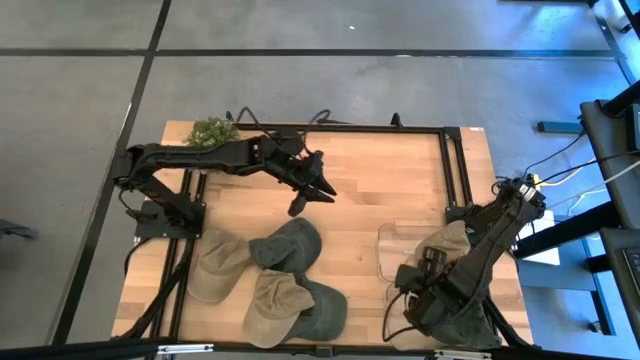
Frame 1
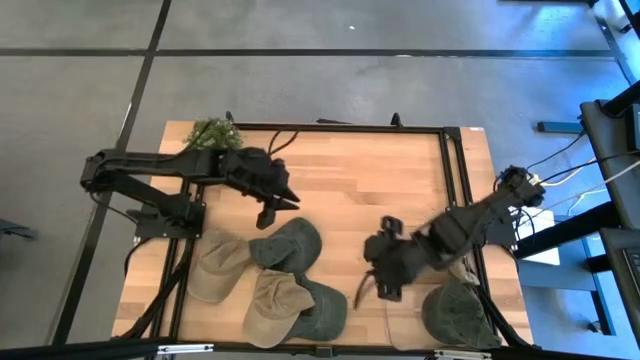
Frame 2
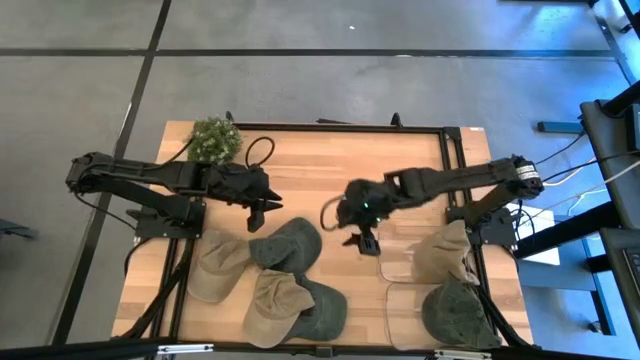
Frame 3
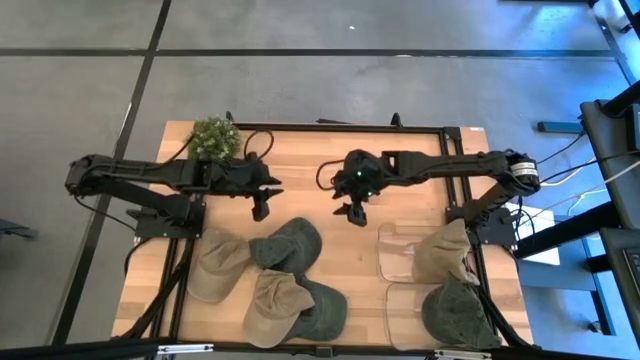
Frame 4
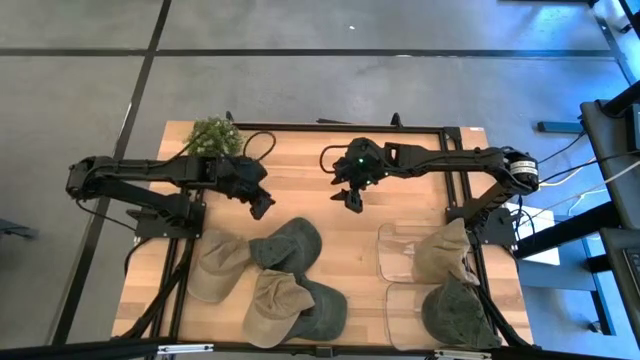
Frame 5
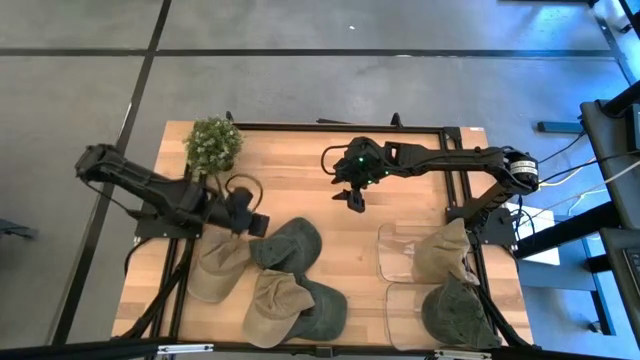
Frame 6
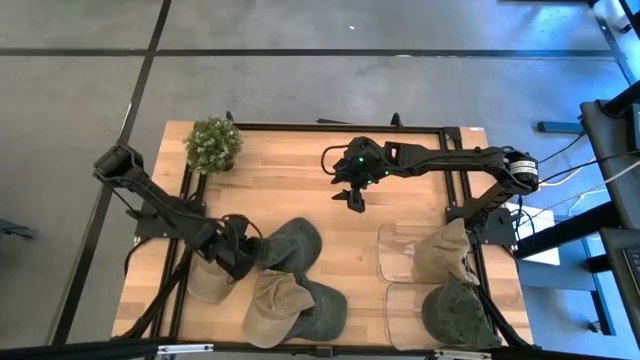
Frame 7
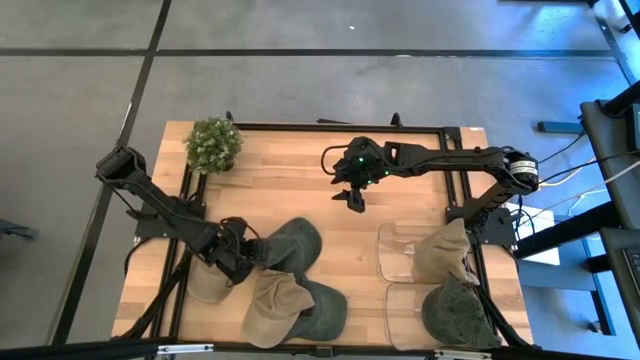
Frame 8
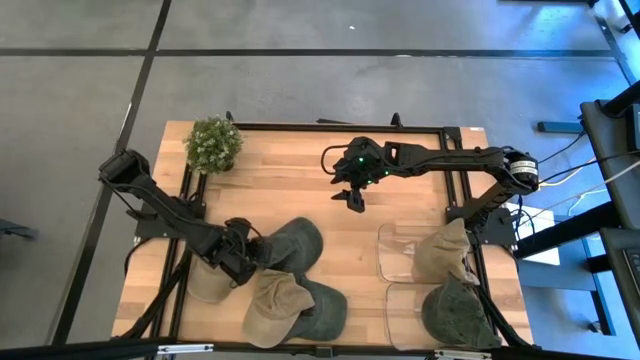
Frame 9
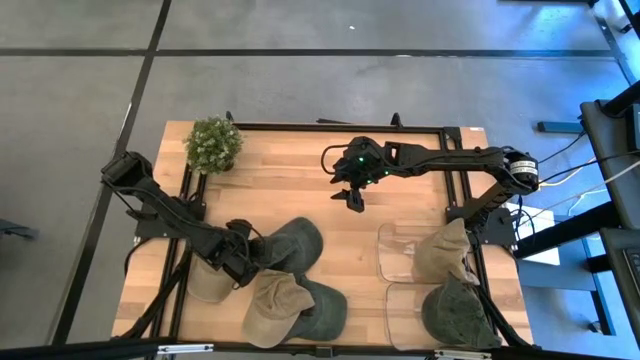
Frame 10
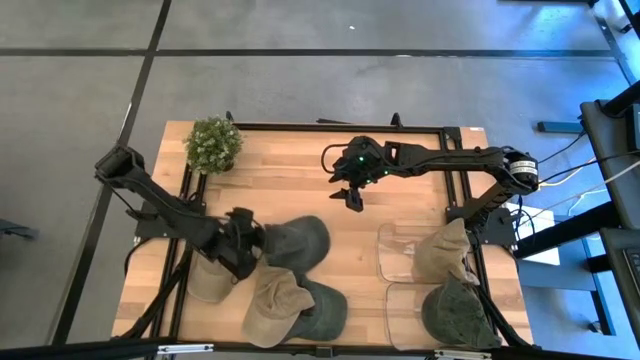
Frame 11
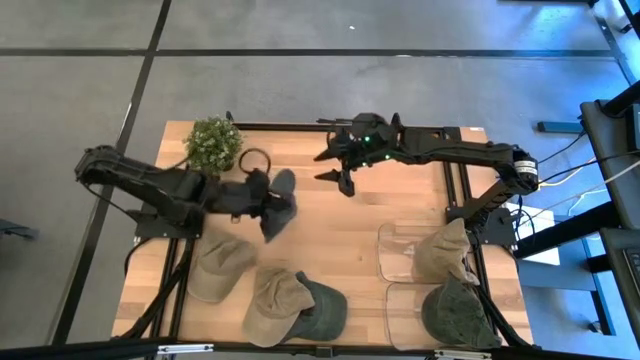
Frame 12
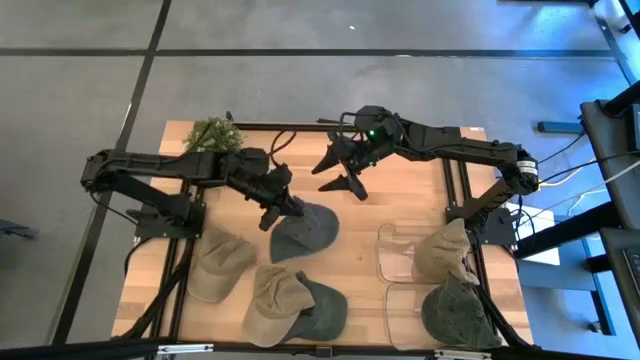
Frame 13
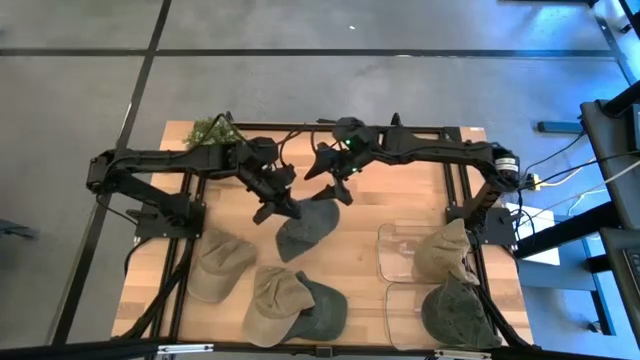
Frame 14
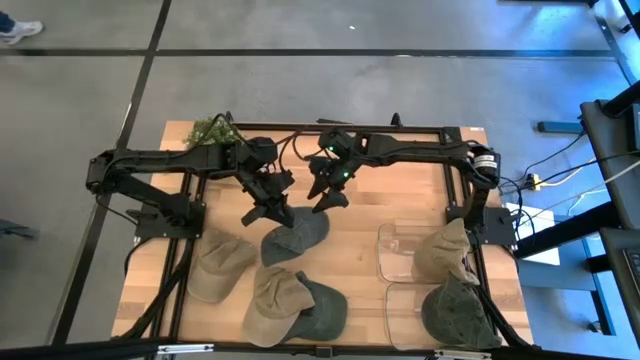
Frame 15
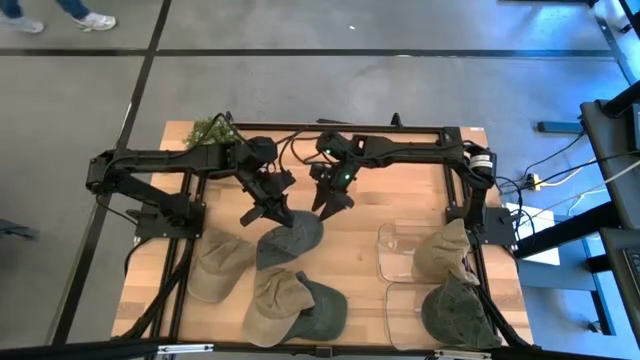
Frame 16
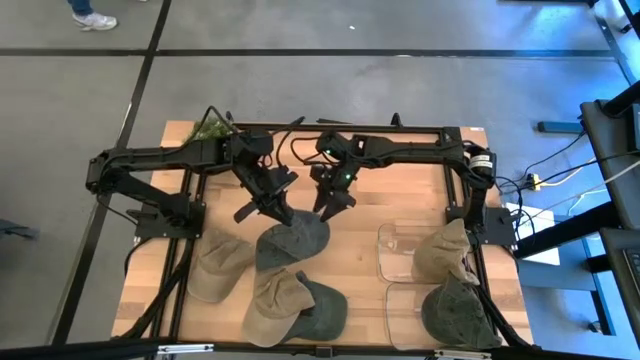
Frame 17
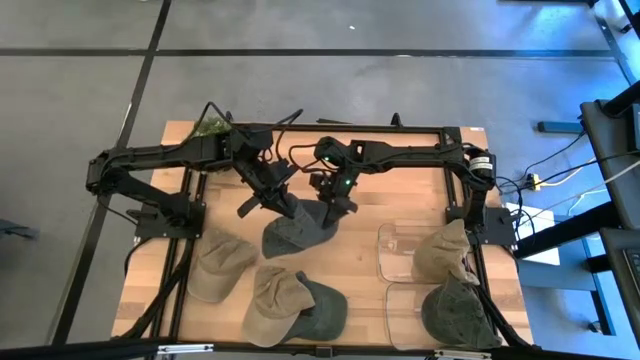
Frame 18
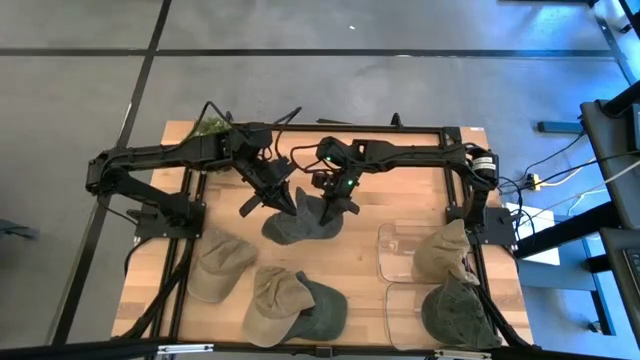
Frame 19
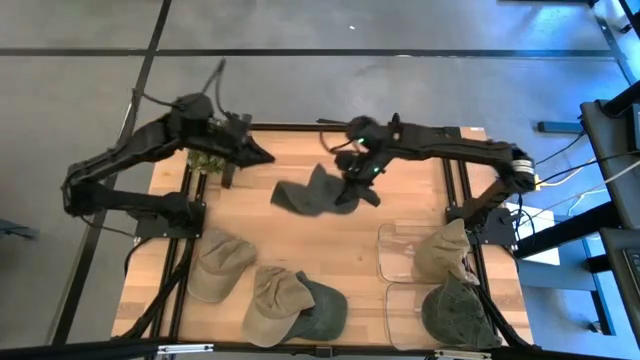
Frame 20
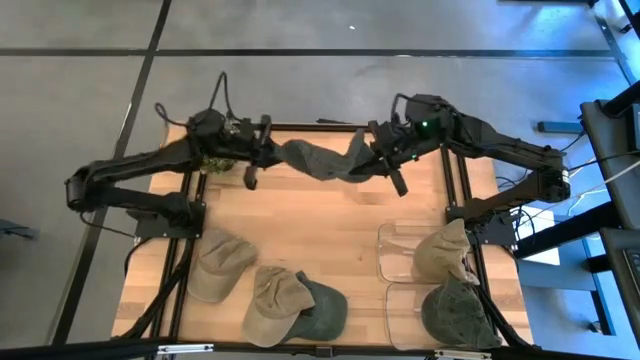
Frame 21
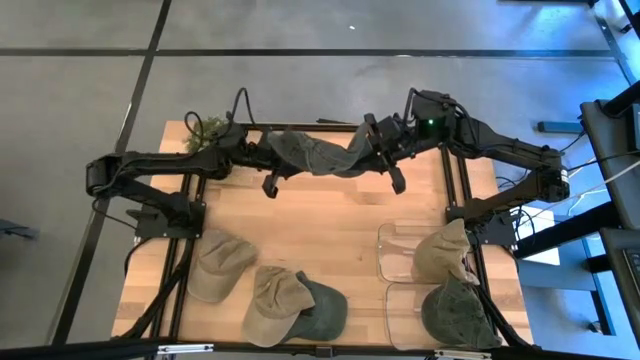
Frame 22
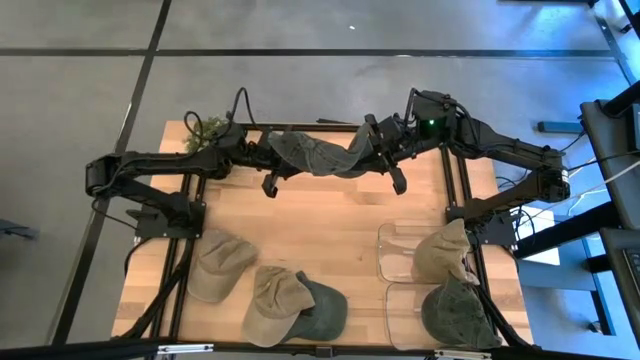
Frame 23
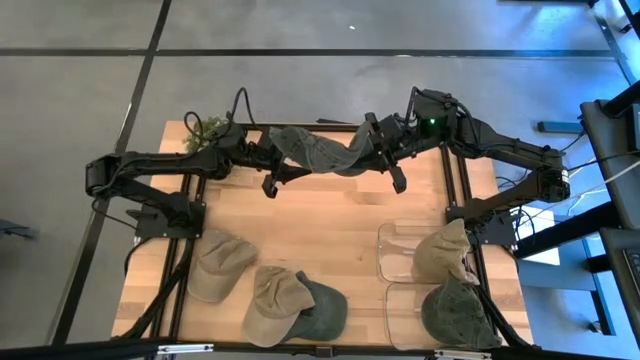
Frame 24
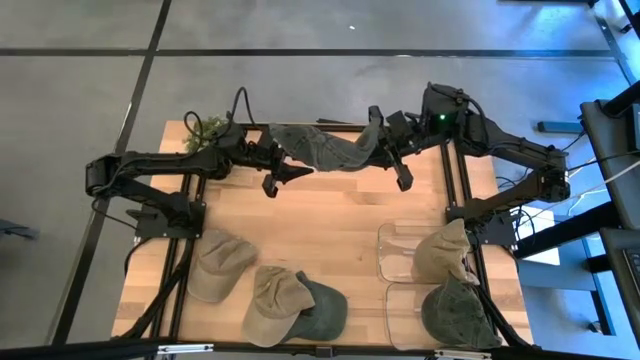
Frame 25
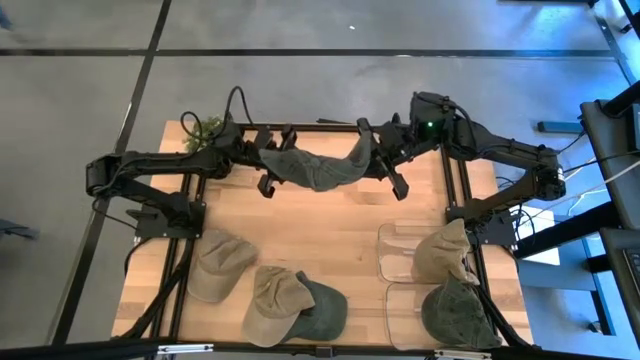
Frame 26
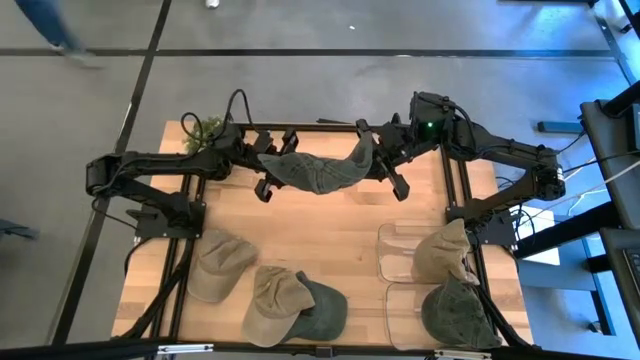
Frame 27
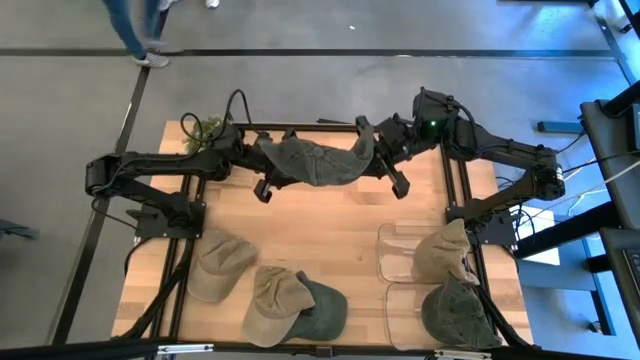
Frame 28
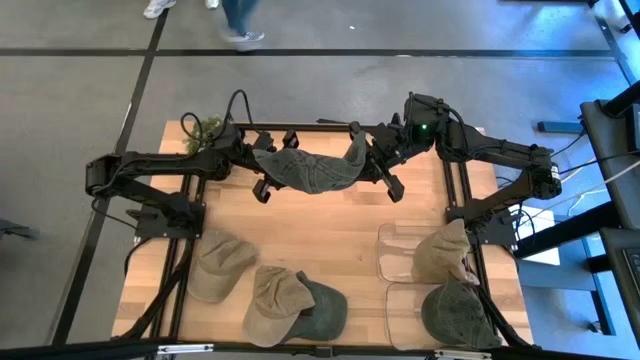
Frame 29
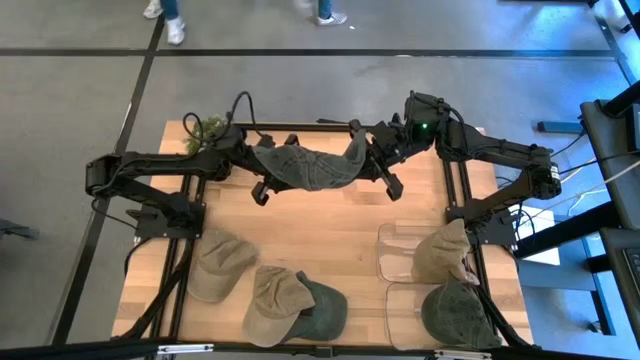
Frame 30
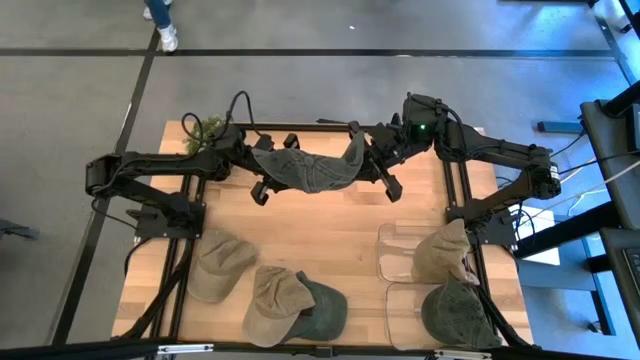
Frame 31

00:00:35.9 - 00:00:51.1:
Task: Pick & Place hat
Put the top black cap into the bottom transparent bin

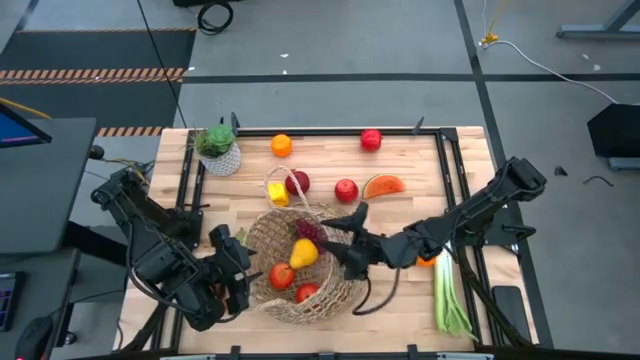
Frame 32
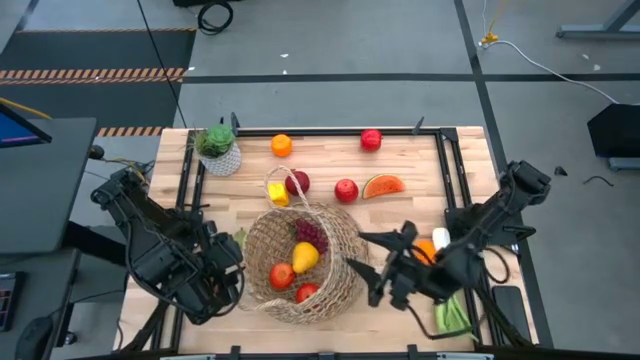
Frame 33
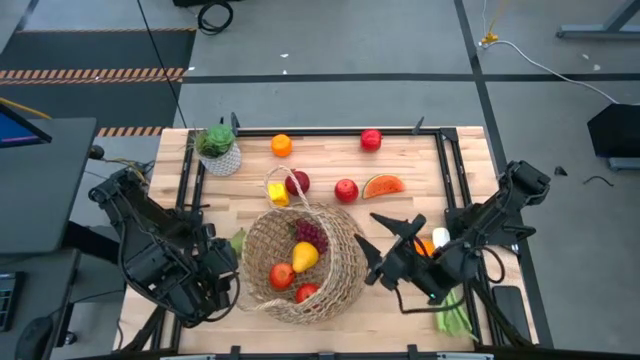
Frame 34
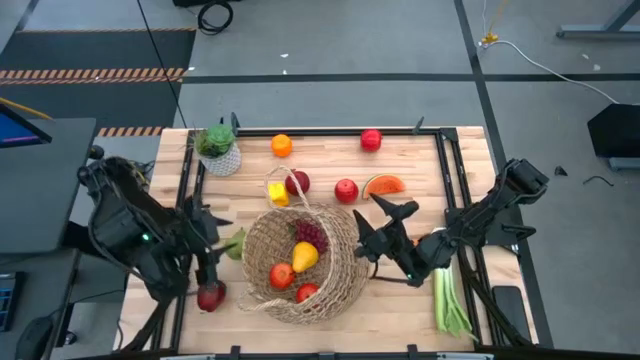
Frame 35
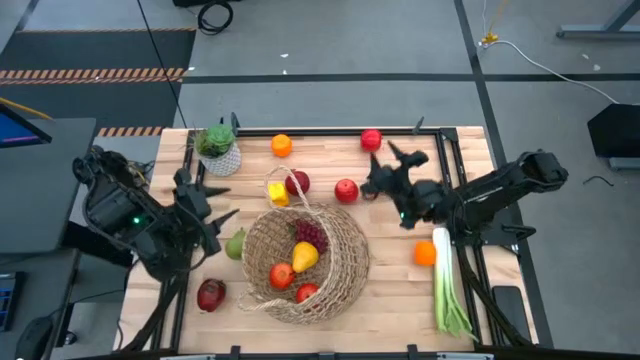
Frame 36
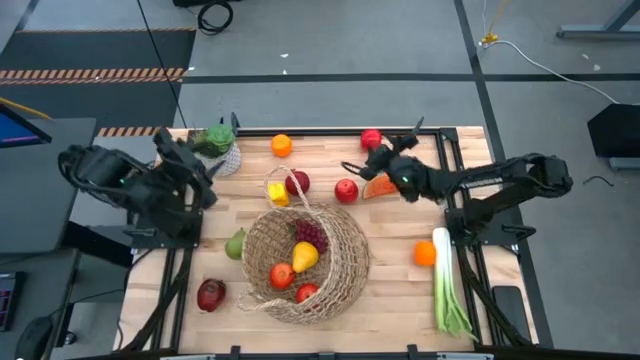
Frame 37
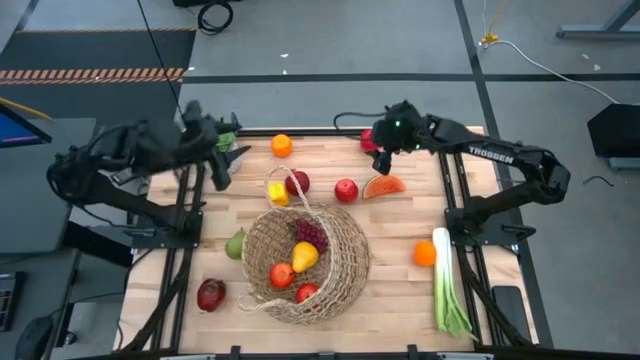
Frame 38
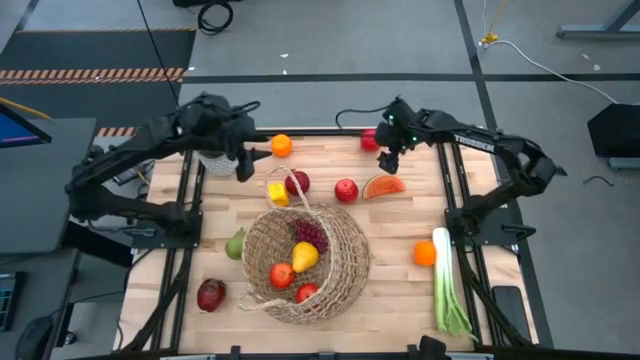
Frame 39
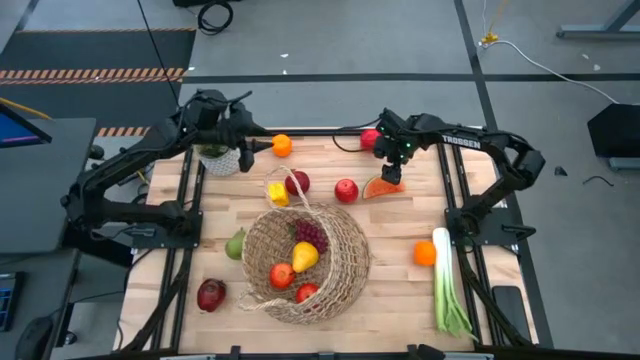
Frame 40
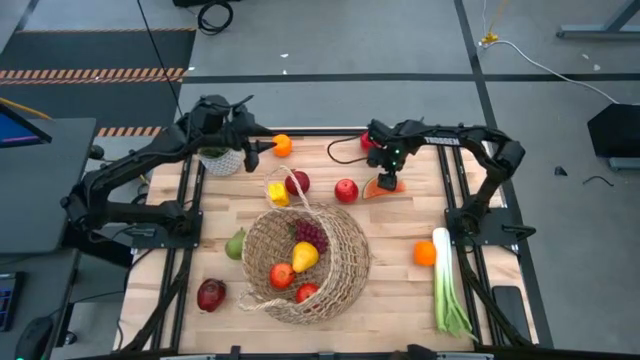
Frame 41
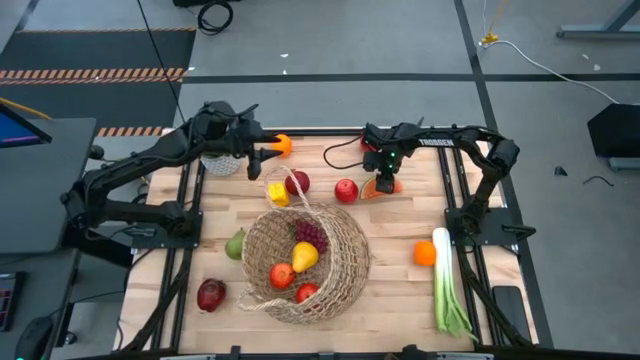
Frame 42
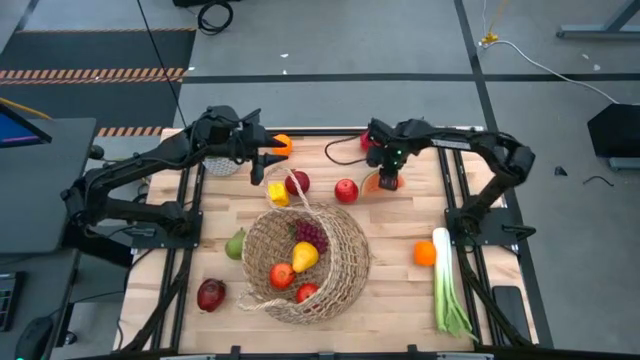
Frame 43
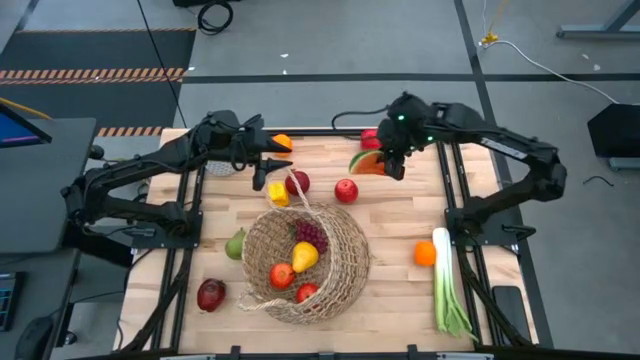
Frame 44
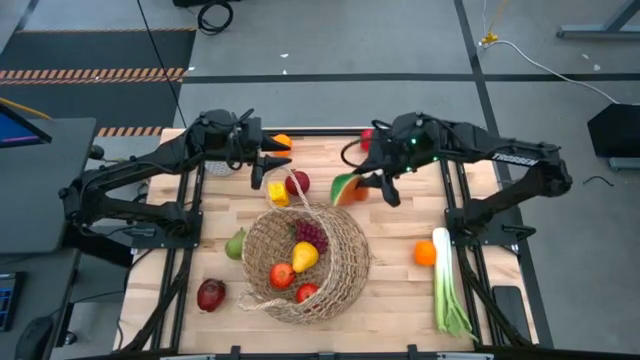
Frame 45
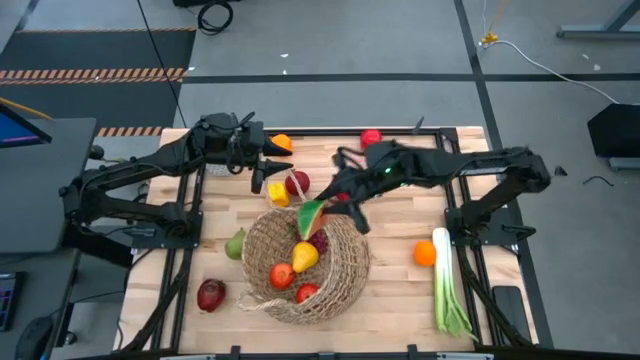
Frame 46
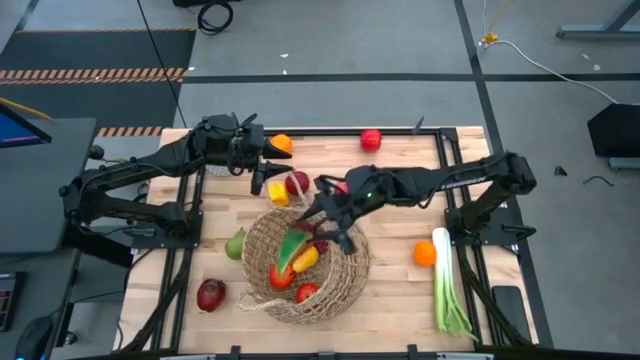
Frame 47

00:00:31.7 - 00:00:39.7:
Task: Build produce basket
Put the watermelon into the basket
